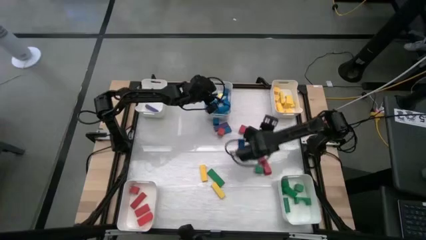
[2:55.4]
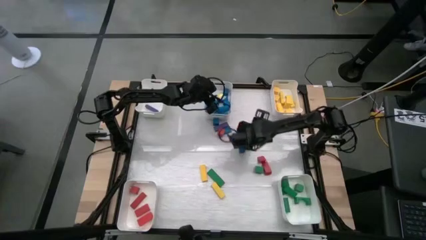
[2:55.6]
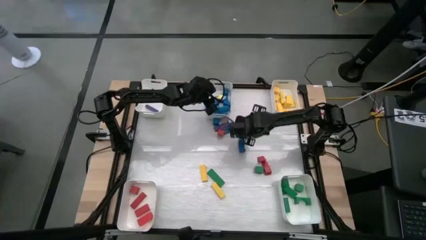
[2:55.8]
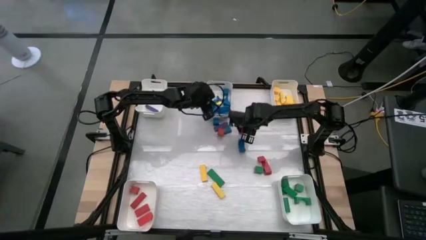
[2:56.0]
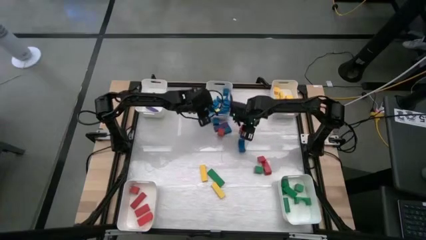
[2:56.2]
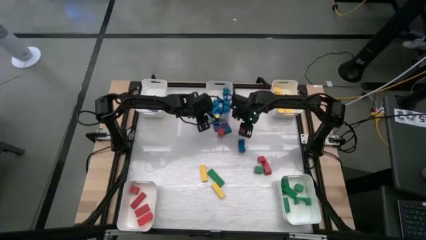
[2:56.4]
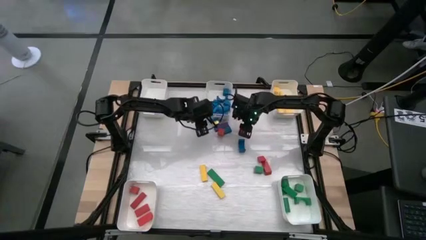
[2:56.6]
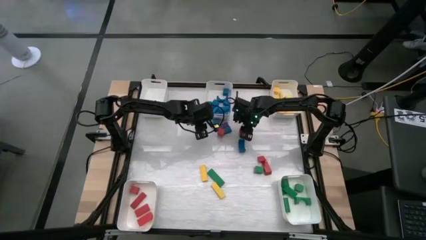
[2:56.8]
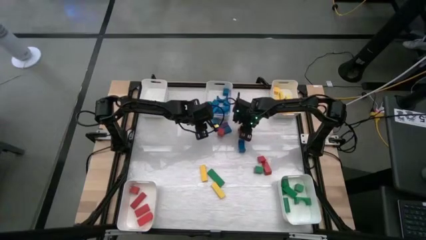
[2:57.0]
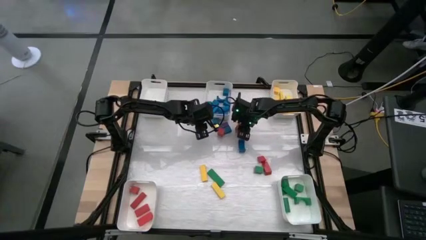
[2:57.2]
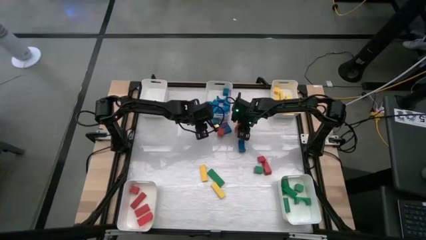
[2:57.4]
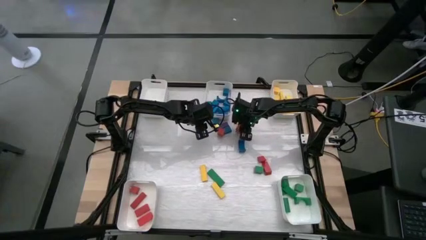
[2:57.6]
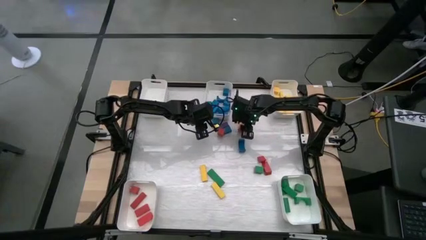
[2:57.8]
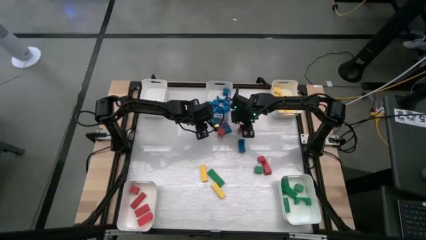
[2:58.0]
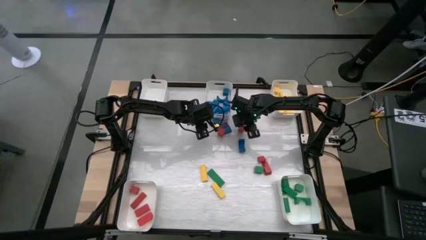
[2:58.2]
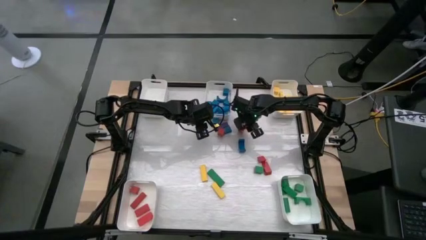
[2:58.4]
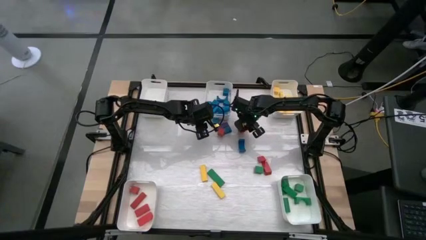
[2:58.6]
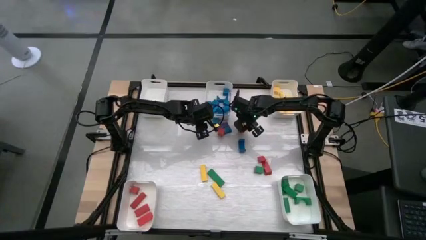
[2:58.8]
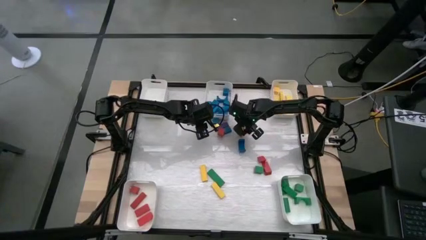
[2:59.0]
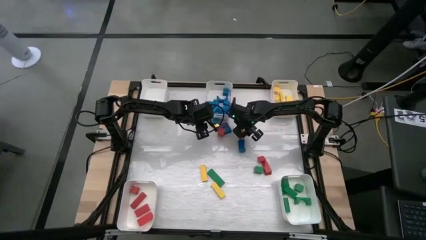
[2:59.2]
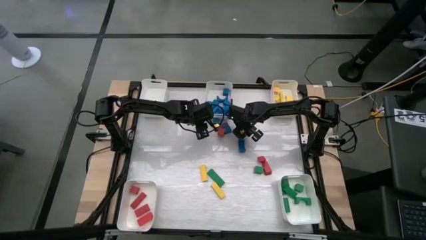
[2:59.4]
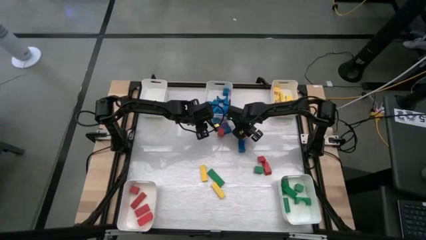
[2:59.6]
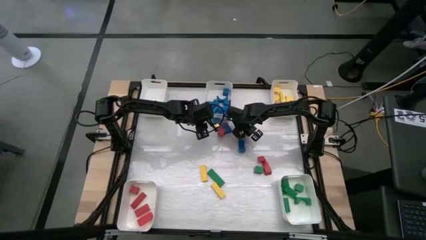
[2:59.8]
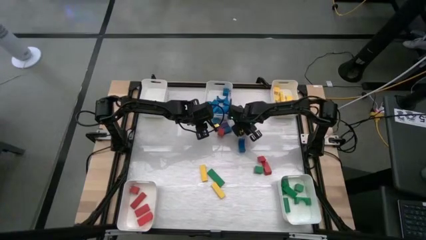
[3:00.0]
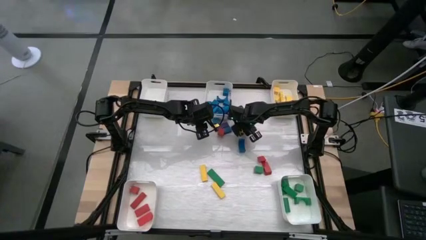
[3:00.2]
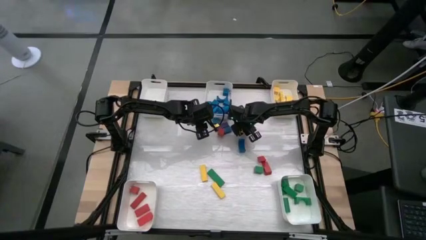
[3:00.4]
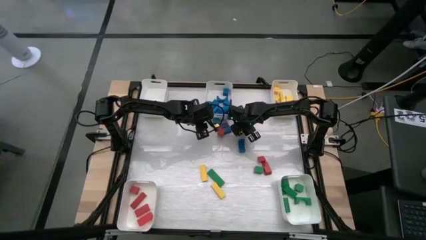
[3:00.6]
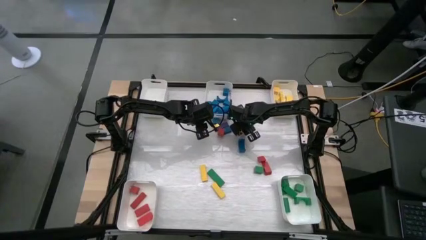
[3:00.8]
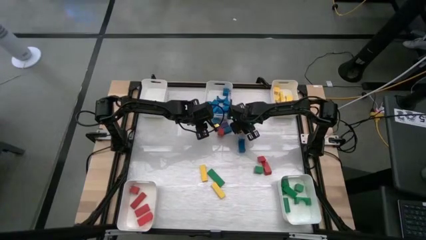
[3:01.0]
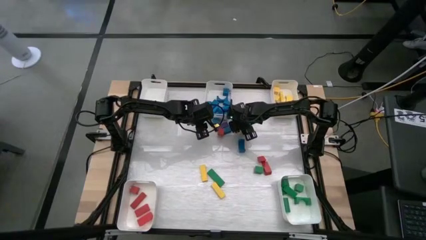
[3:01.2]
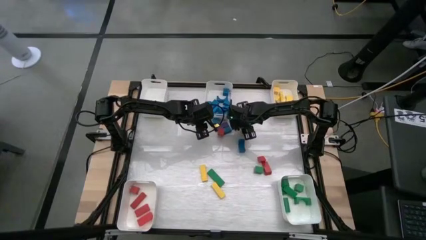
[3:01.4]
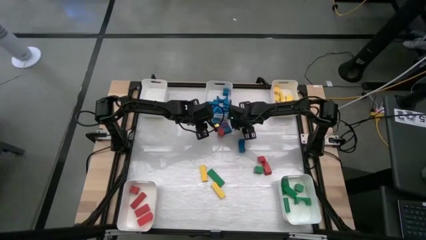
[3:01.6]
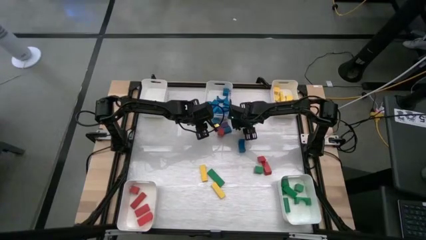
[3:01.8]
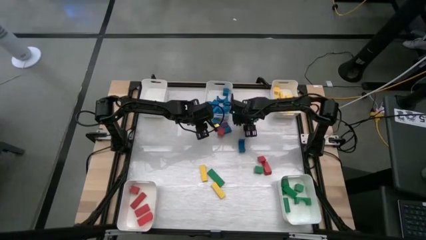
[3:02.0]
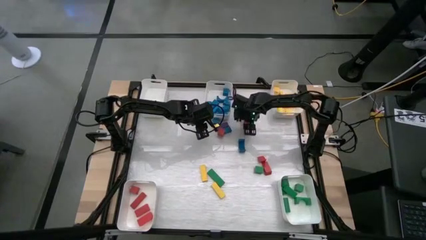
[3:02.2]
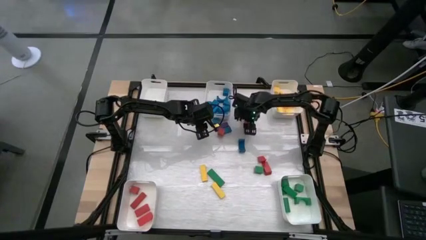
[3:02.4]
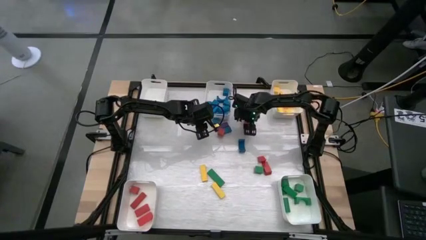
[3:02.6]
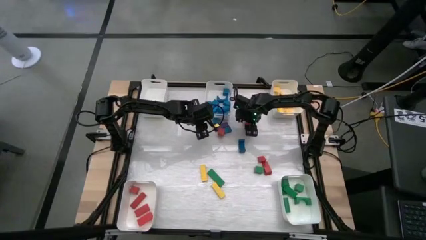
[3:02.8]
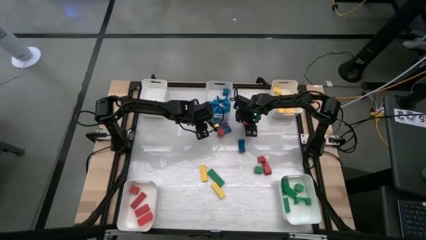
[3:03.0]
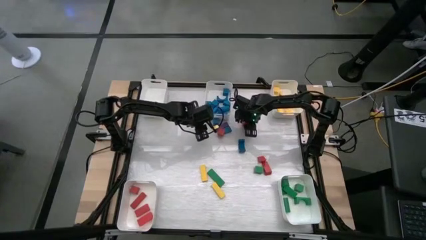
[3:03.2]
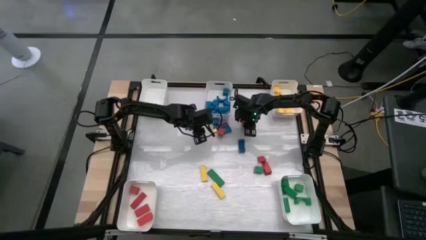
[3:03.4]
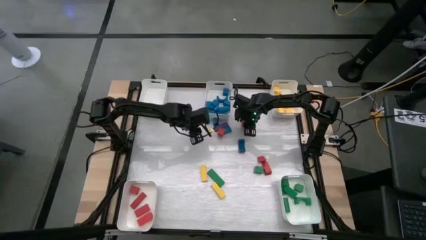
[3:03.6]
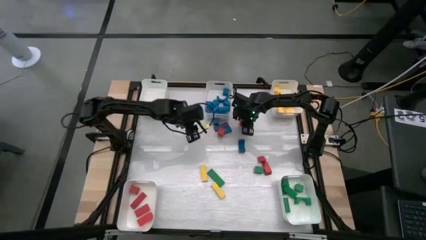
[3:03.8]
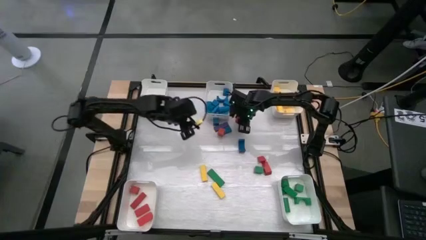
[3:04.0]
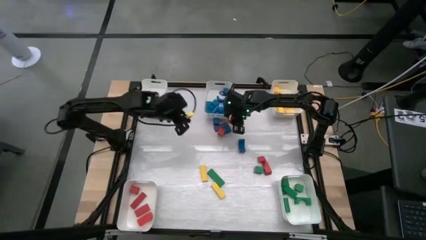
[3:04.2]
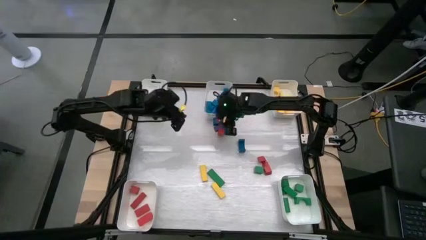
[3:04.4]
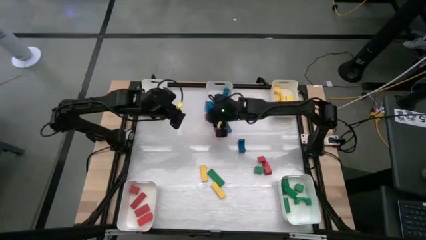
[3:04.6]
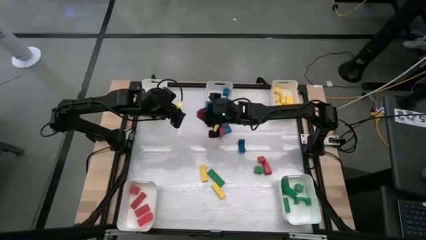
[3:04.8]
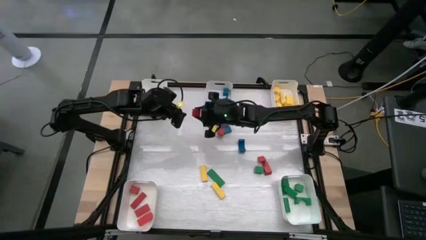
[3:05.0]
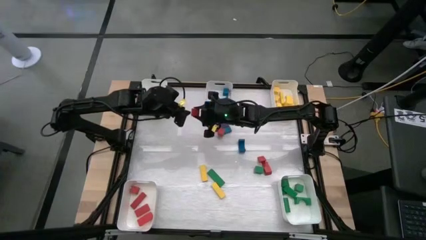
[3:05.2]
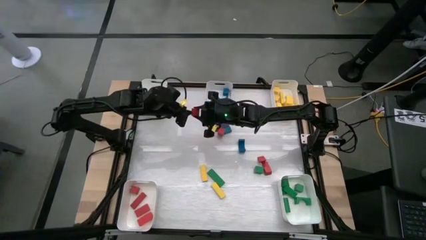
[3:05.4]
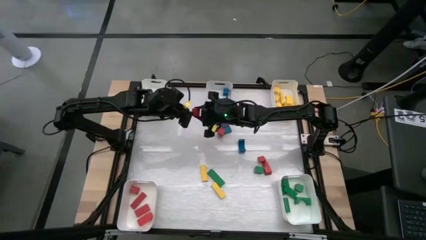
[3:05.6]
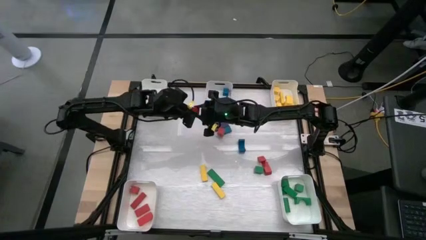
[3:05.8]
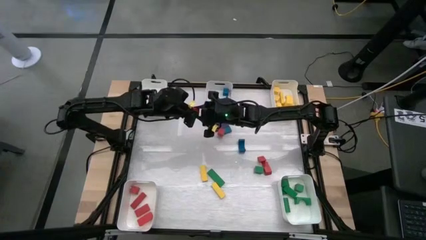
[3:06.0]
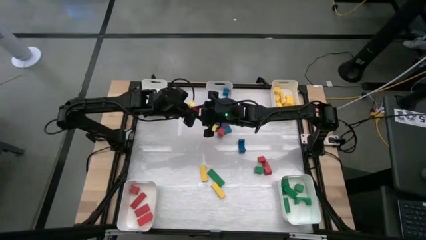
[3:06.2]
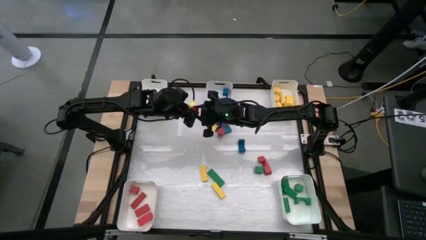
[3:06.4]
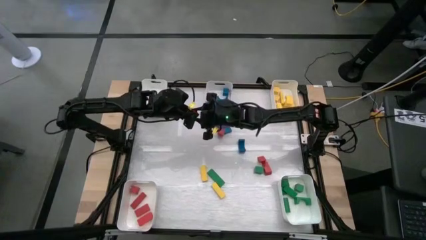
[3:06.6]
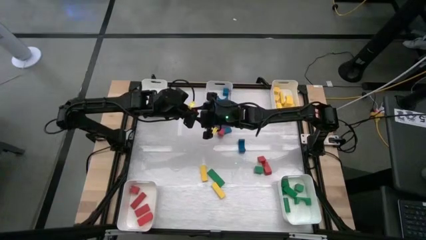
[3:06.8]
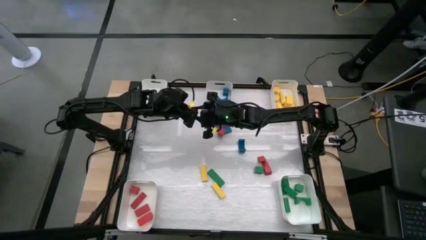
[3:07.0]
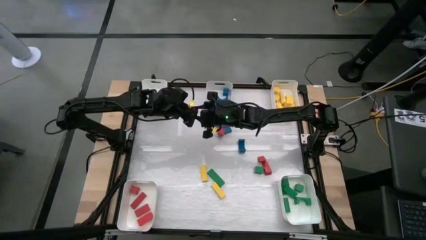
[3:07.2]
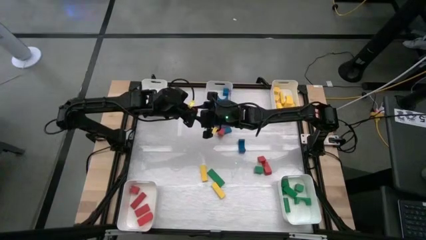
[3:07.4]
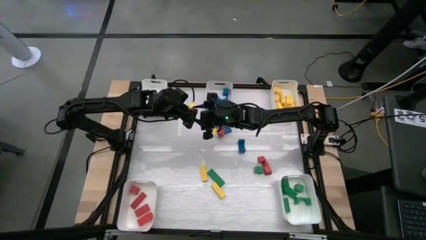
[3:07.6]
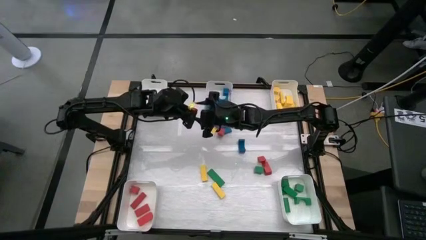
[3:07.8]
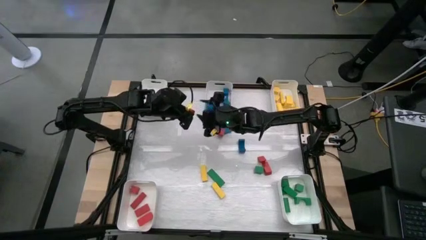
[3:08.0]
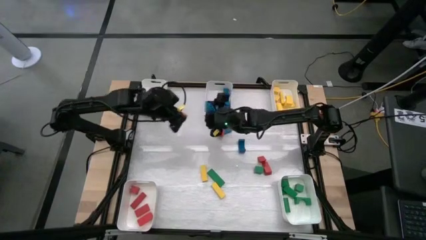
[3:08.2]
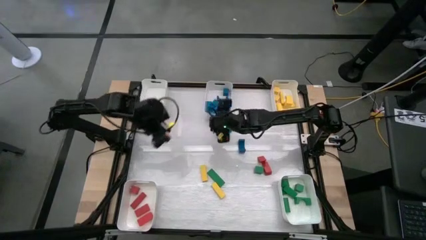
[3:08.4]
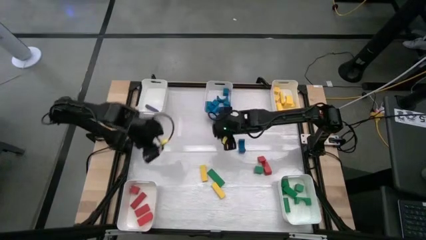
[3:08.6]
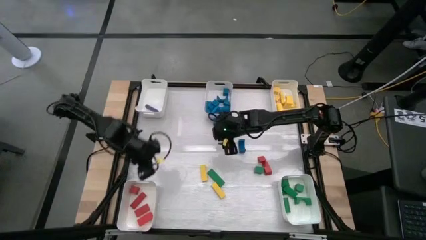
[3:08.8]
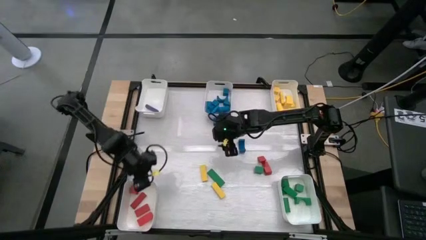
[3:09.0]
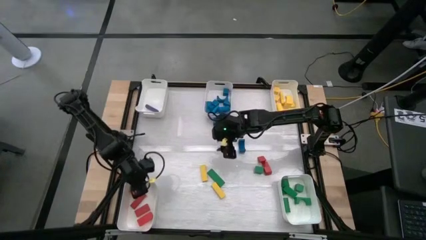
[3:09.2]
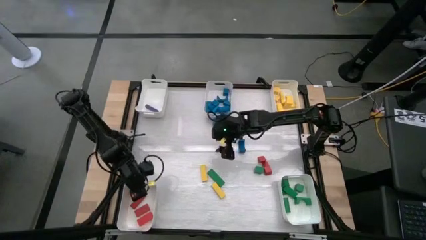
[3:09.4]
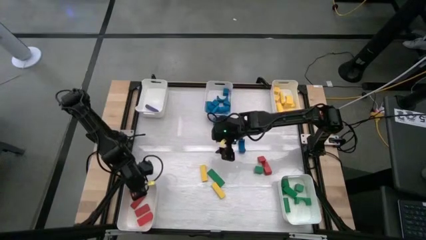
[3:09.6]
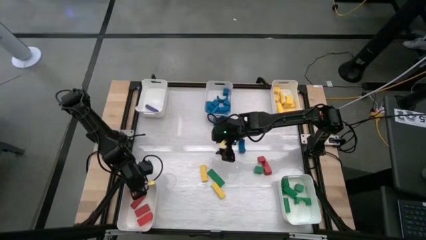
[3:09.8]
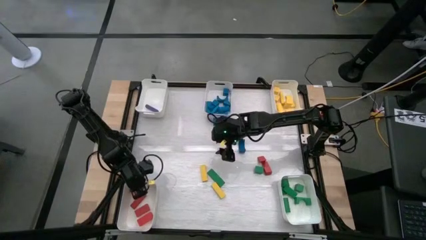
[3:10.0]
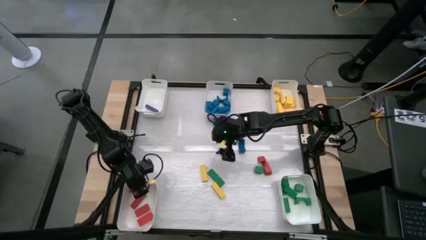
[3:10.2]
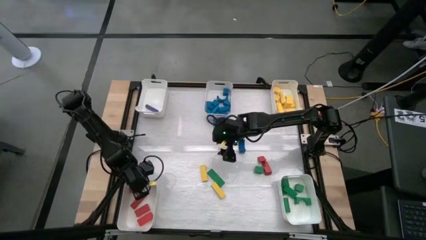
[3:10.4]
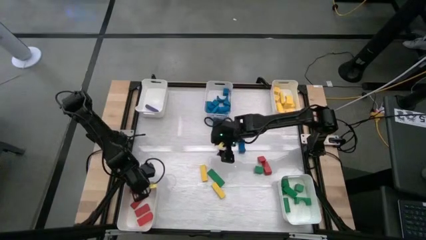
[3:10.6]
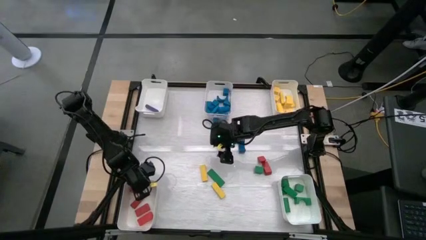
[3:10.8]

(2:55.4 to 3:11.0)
Task: Sort blocks
Put the red block into the bottom left white bin

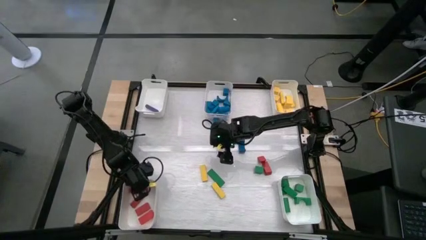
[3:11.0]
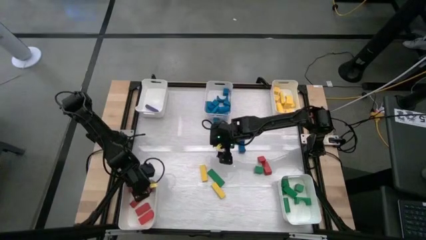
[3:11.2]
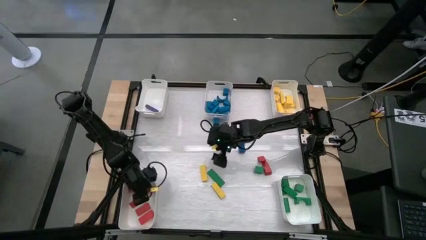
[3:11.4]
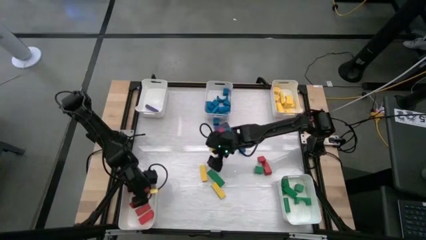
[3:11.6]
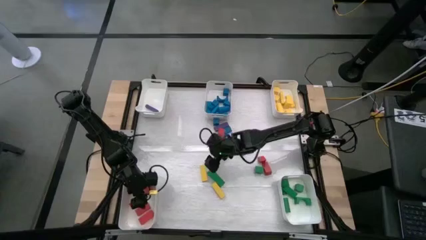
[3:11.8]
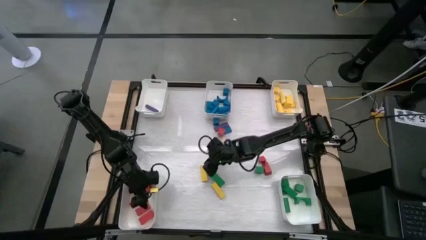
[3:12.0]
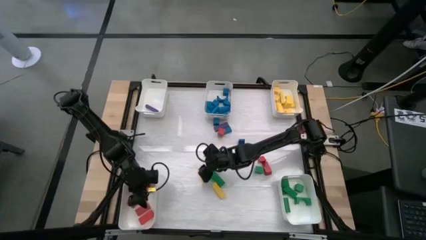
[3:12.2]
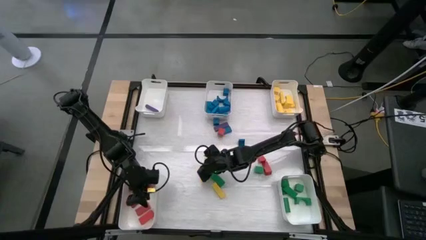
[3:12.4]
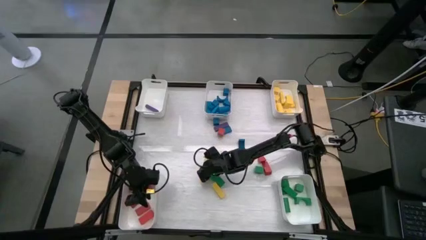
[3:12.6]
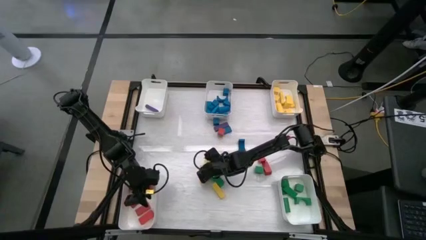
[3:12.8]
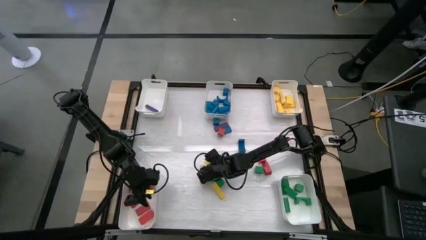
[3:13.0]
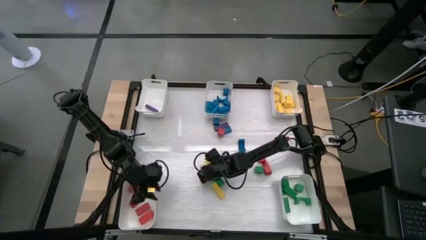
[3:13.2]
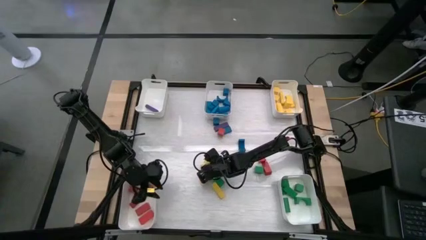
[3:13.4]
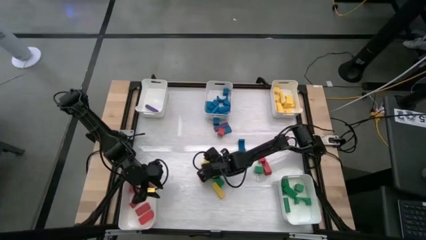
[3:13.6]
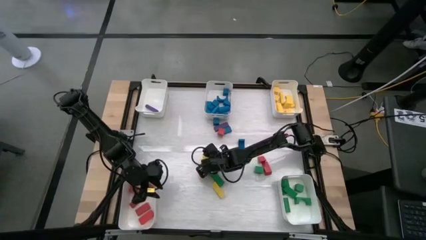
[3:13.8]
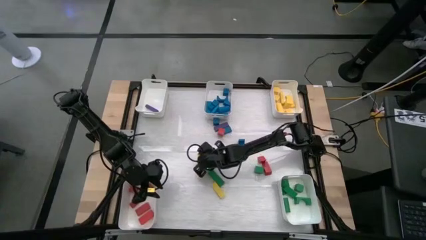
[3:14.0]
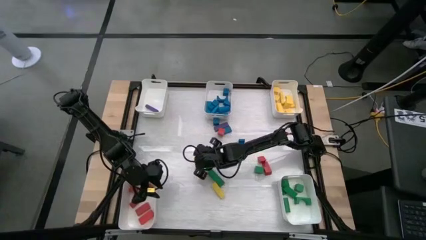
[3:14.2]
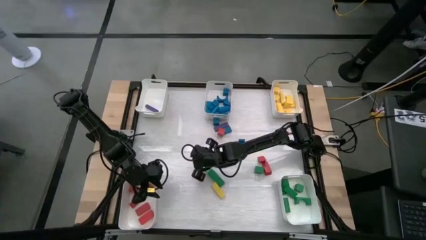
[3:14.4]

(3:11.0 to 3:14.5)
Put the yellow block into the top right white bin
